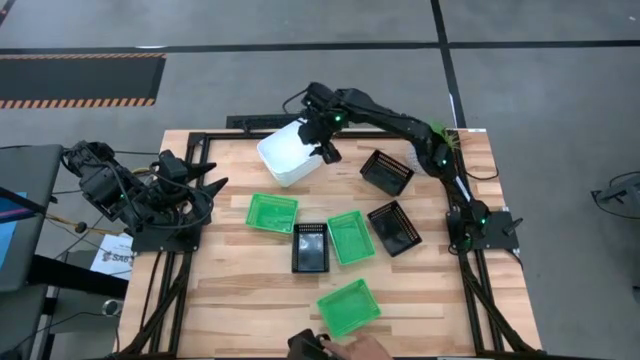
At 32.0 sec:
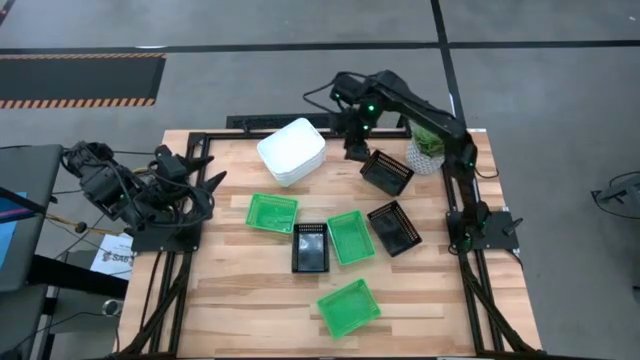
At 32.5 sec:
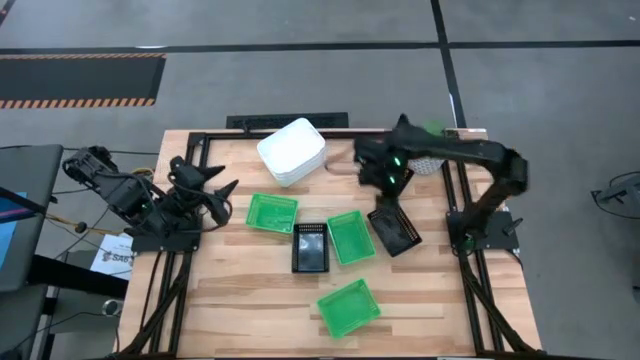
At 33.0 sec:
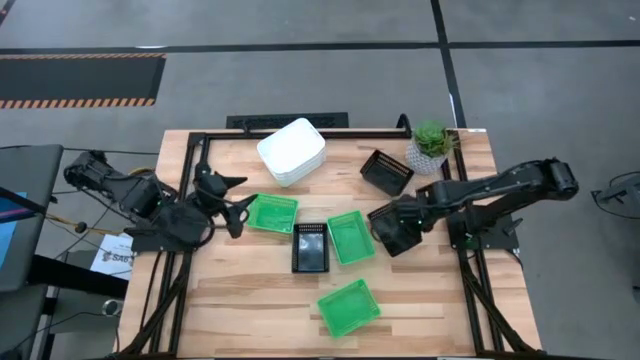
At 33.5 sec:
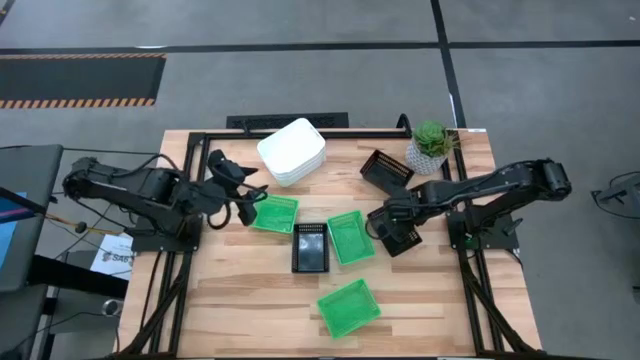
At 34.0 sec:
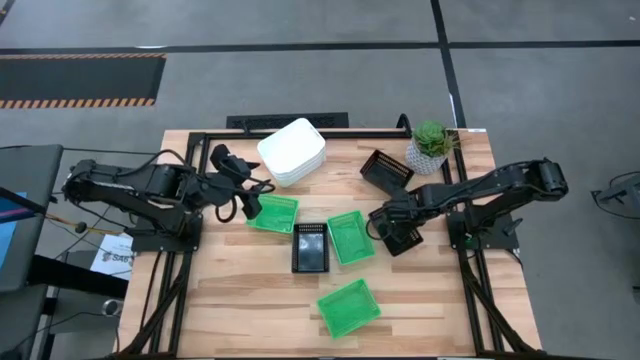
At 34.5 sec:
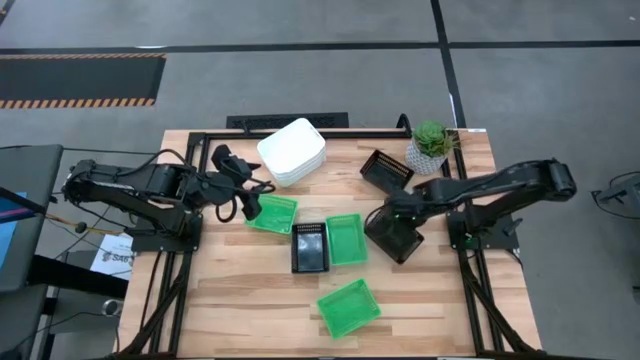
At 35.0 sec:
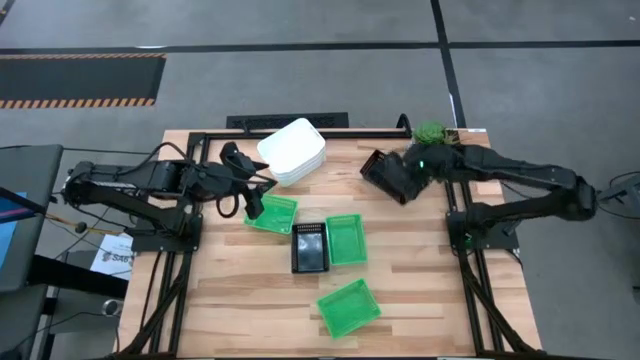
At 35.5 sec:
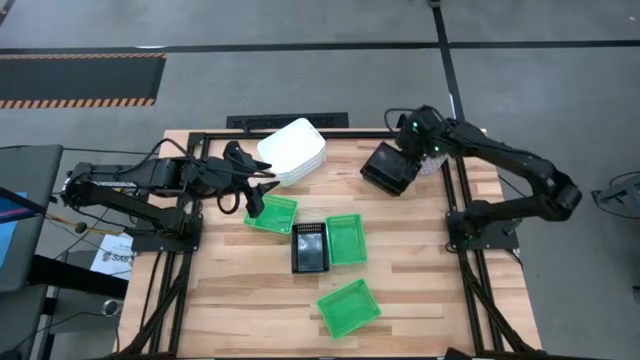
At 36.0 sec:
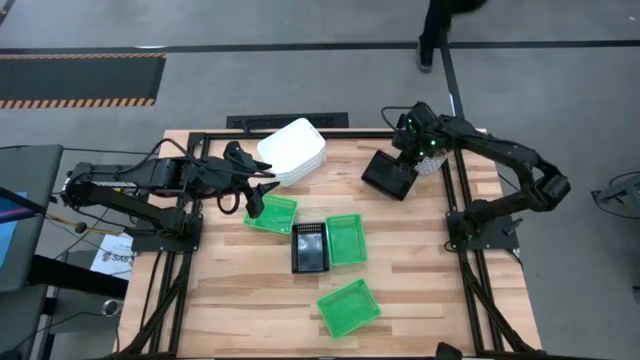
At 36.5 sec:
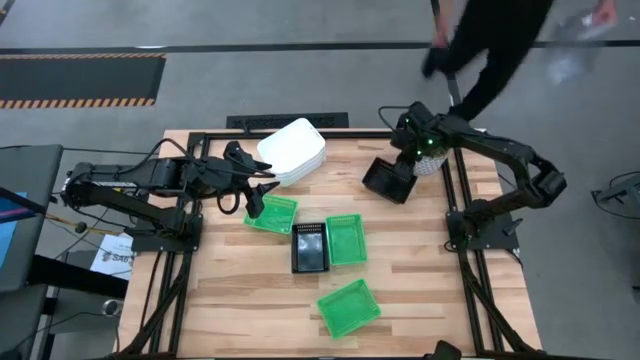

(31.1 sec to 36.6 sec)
Stack the bottom right black bin on the top black bin

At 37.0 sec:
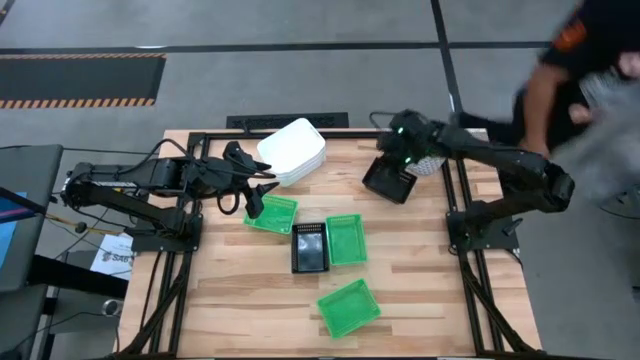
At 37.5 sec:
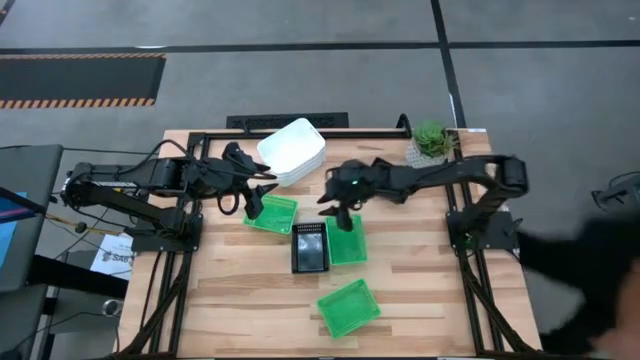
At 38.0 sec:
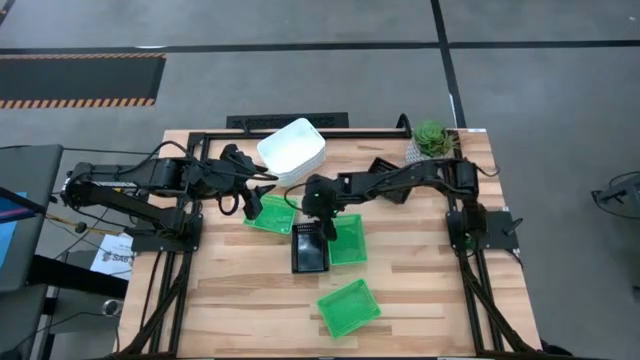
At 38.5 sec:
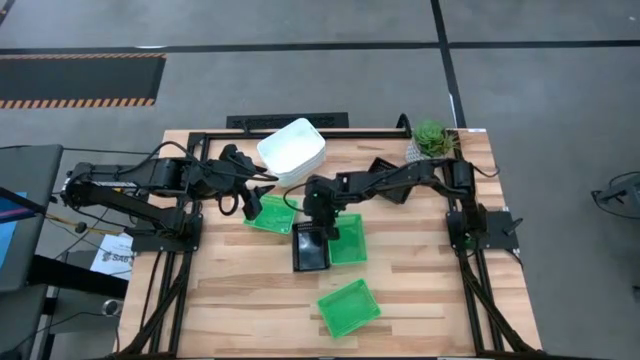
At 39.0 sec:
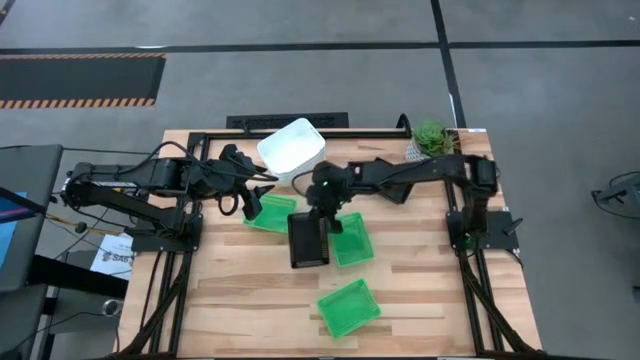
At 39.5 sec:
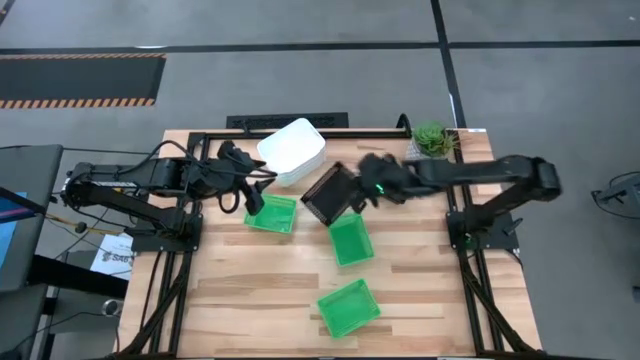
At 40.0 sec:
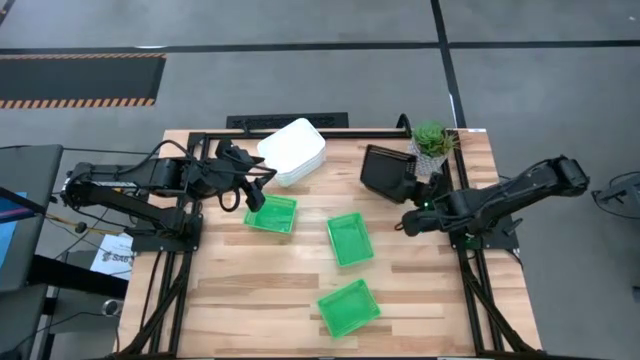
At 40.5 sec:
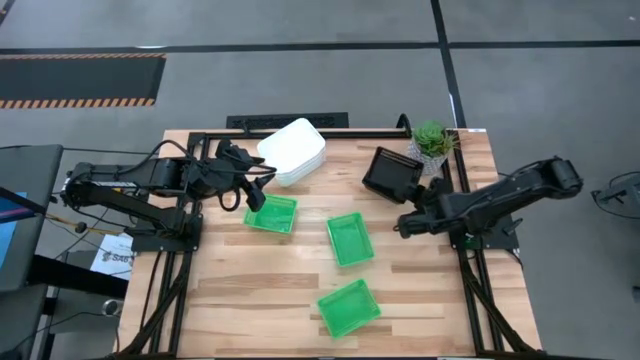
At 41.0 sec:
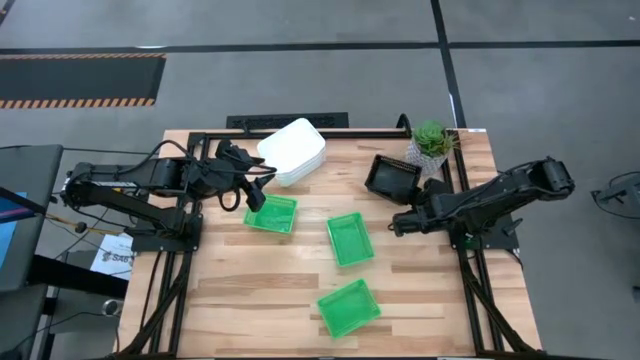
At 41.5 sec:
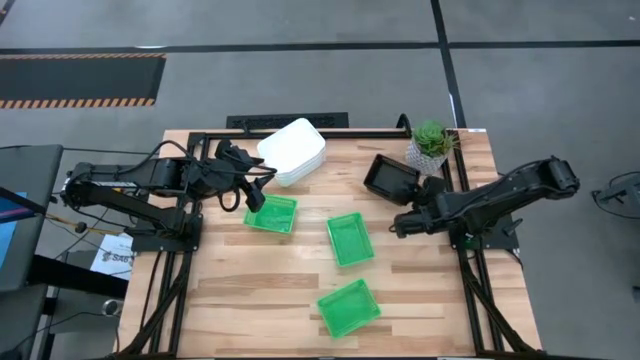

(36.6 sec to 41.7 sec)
Stack the bottom black bin on the stacked black bin

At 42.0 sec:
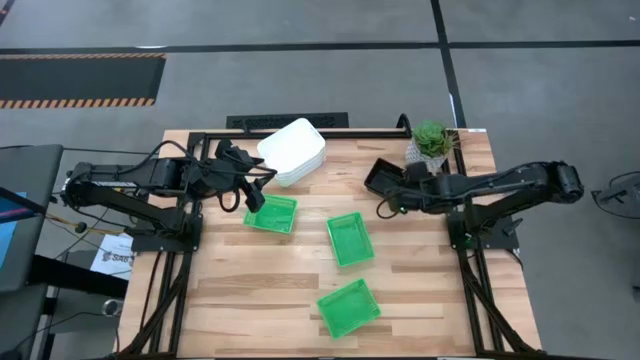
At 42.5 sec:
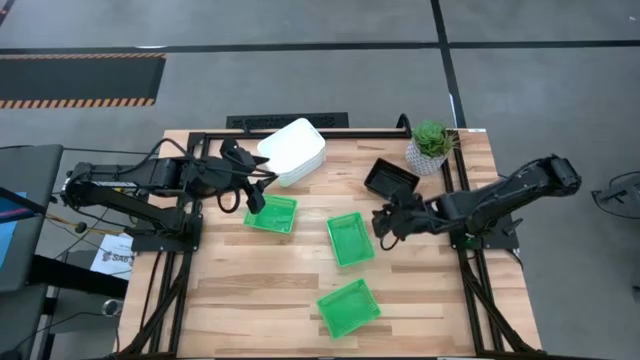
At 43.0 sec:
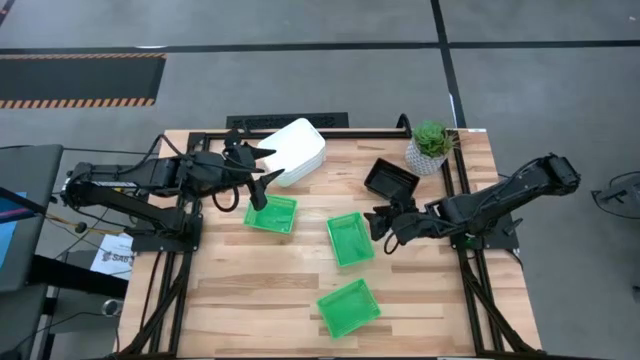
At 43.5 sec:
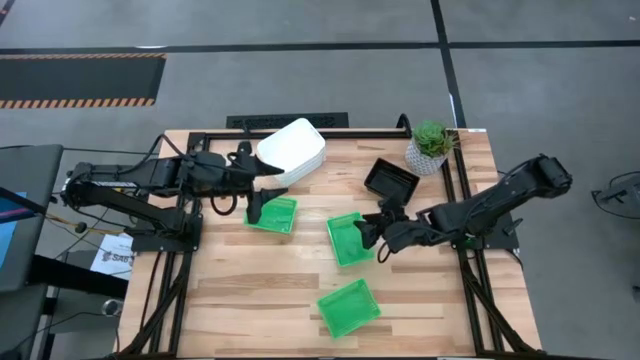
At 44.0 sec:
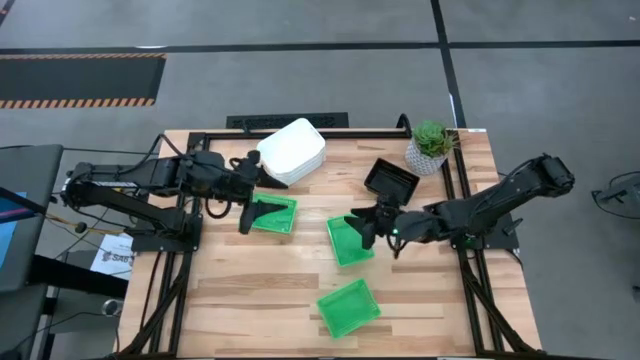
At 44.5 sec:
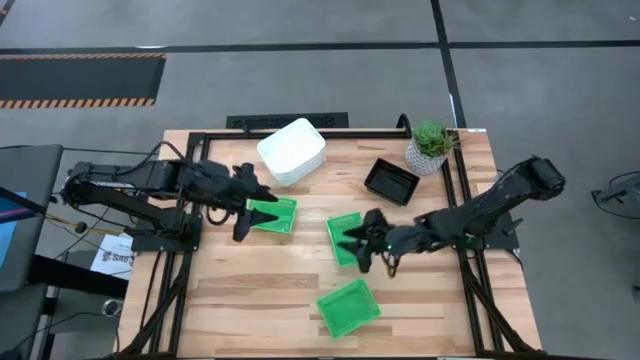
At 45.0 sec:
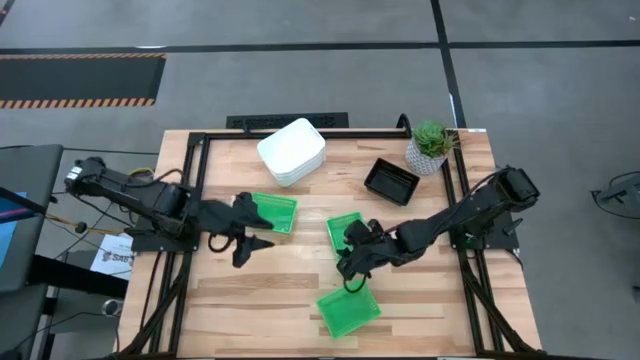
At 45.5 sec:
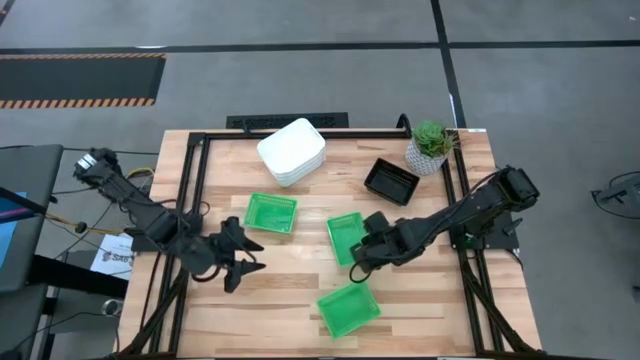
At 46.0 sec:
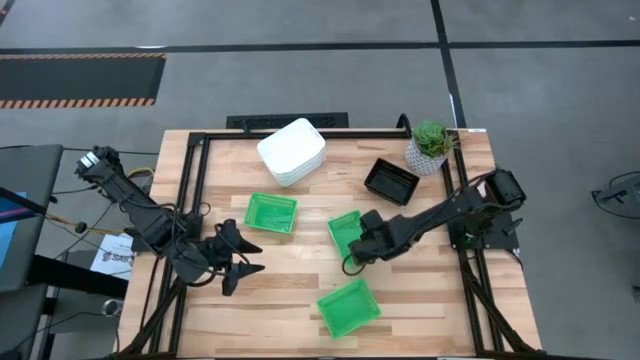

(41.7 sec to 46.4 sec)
Adjust the top right green bin

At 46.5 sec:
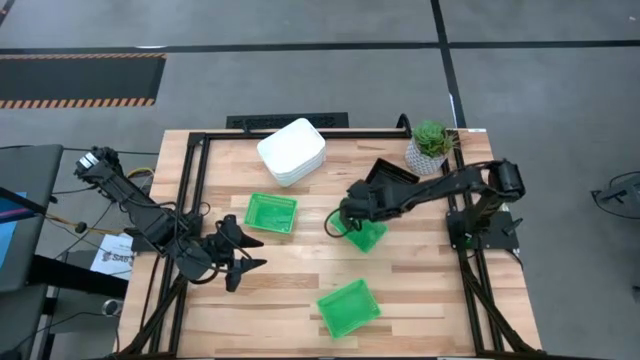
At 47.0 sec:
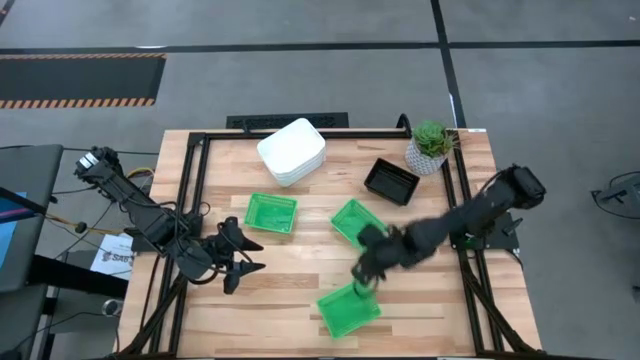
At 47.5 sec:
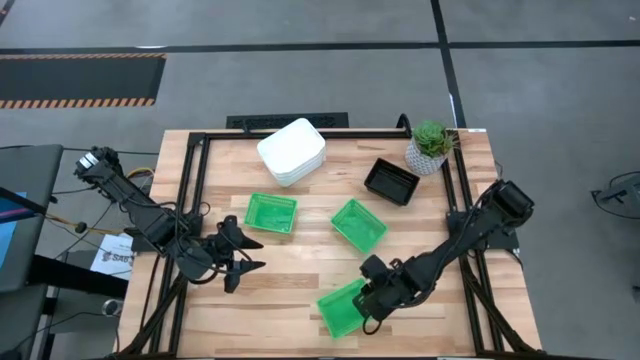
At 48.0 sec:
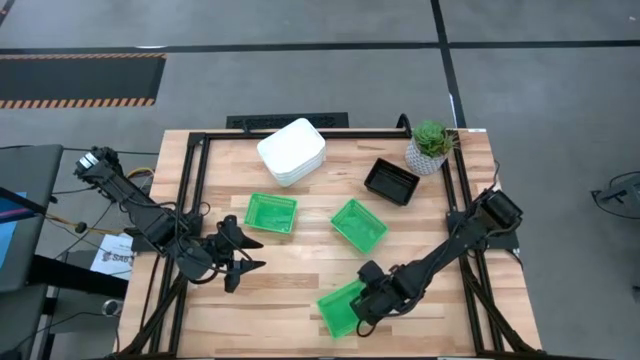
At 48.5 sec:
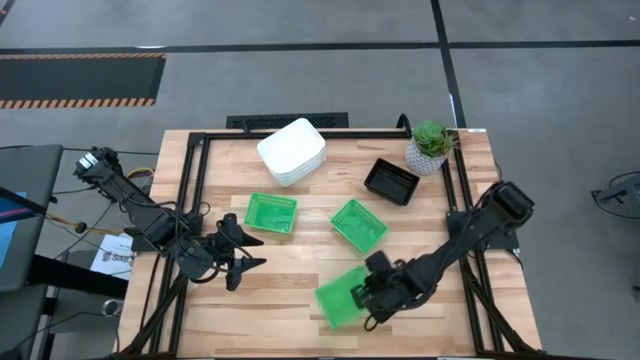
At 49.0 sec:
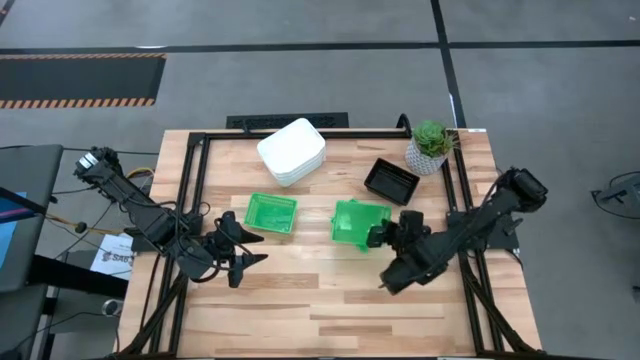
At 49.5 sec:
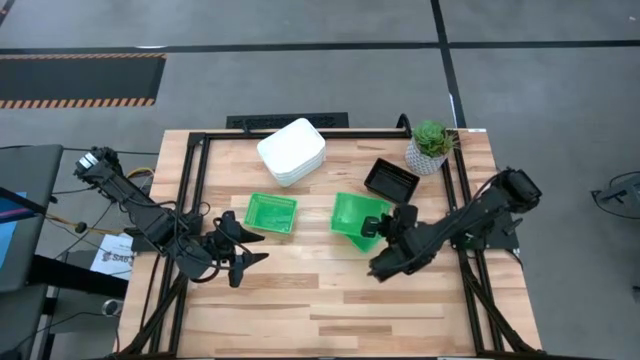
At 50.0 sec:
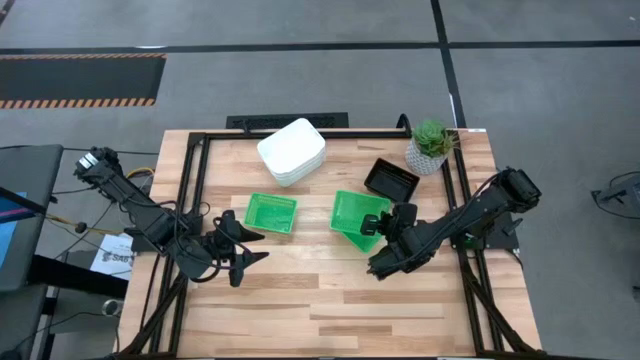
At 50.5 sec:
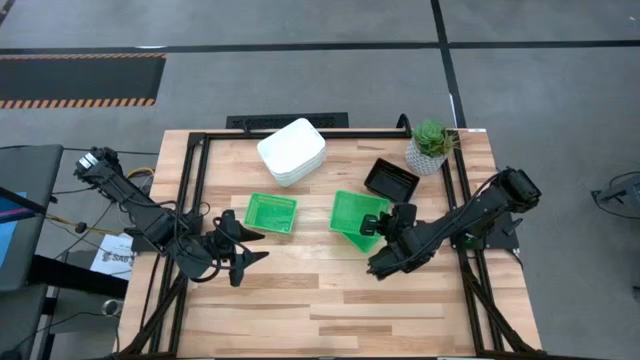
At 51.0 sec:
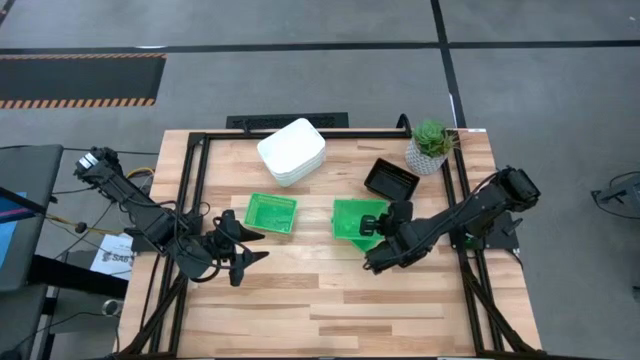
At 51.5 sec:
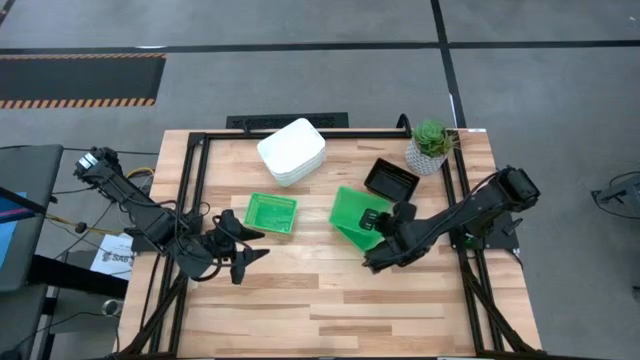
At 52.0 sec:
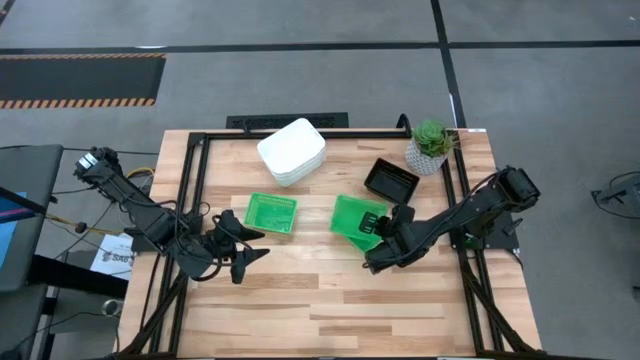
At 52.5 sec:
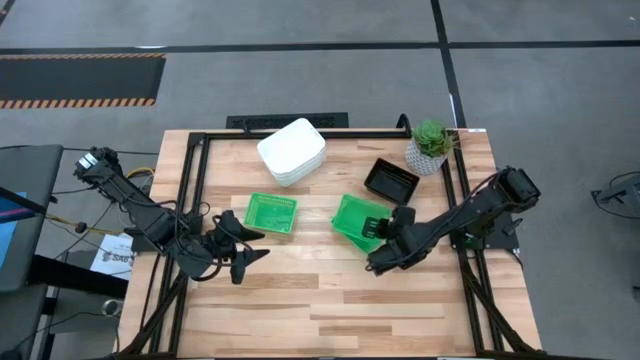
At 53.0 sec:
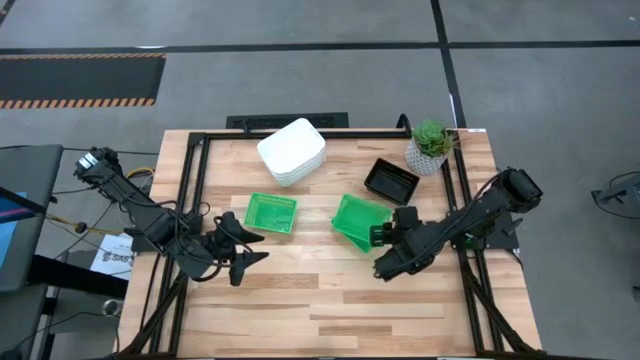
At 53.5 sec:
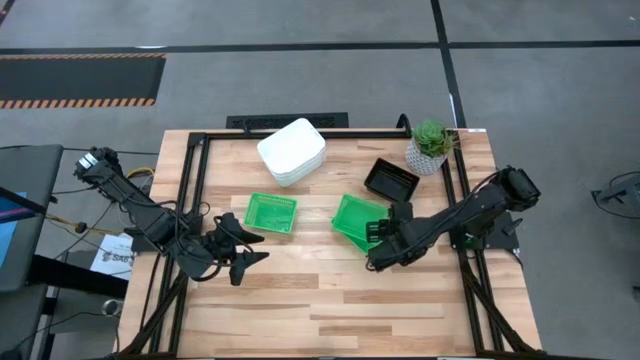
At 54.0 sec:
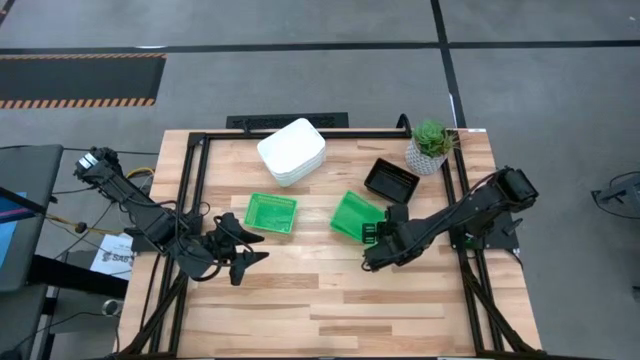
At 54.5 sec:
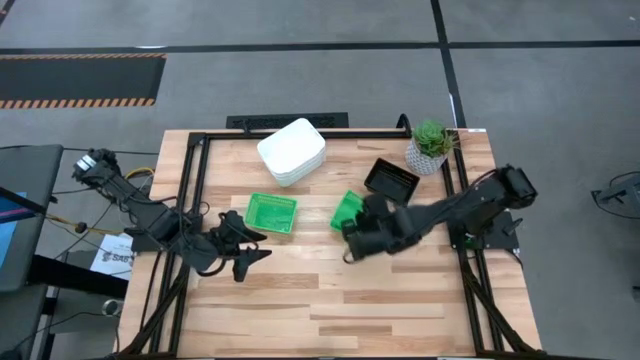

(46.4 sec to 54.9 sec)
Stack the bottom green bin on the top right green bin
